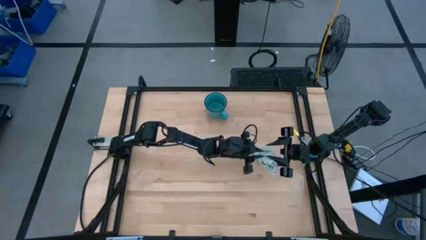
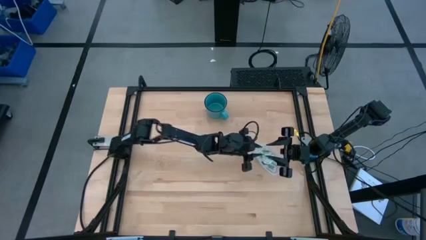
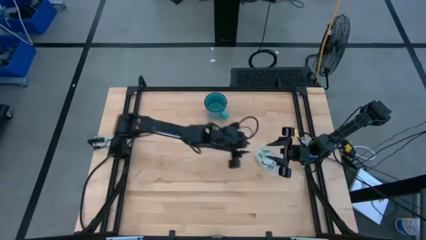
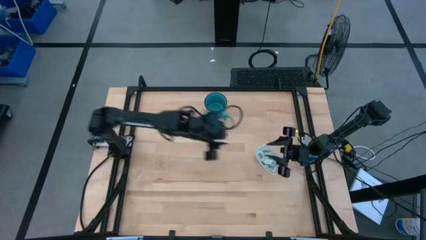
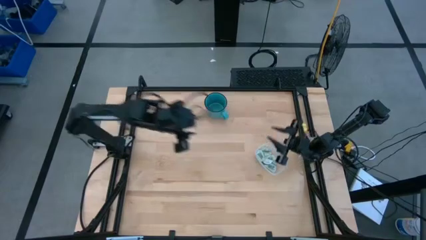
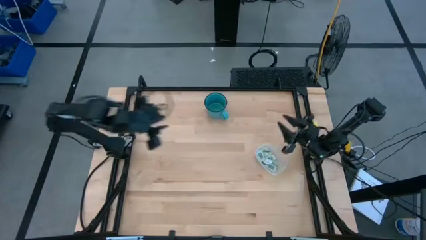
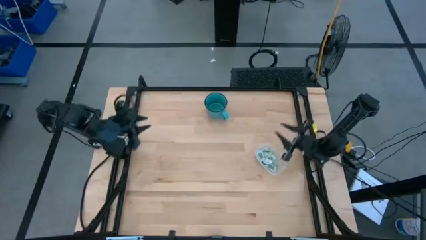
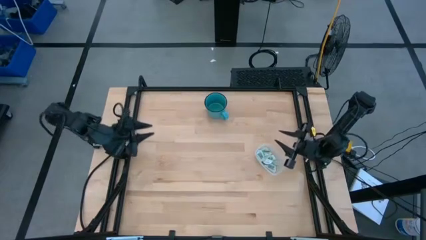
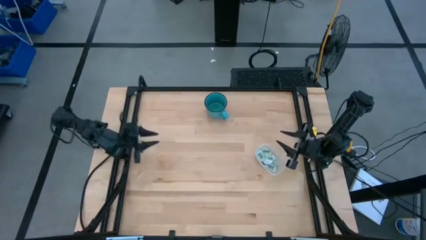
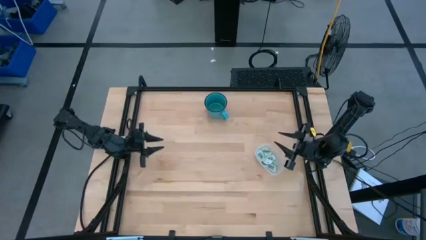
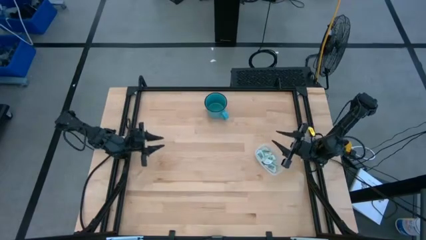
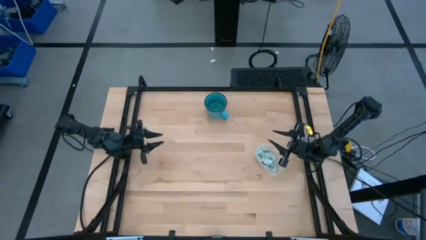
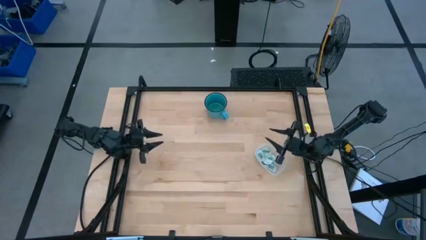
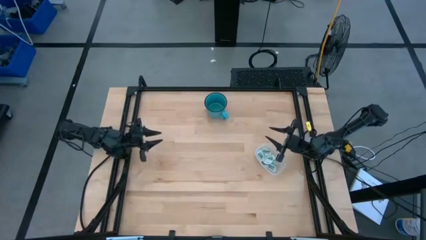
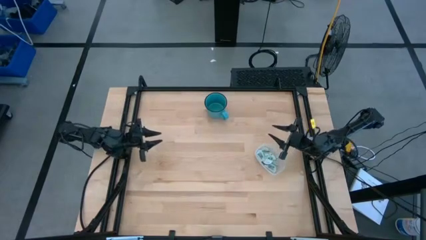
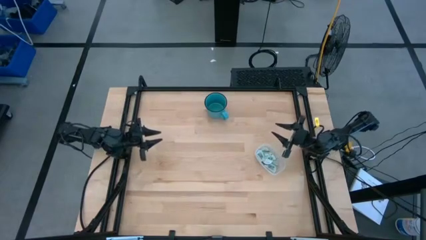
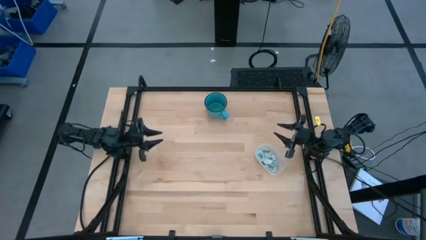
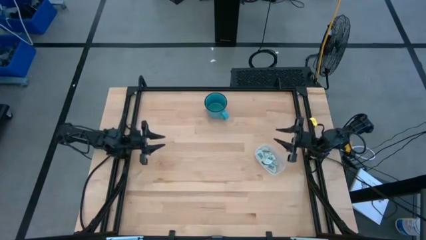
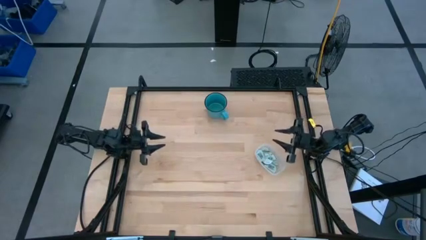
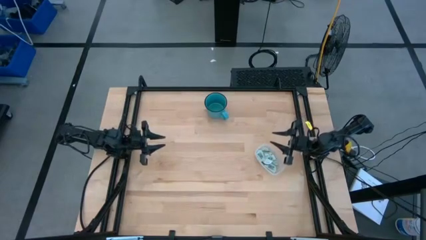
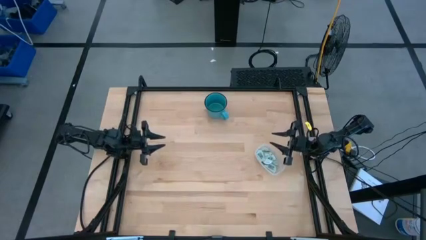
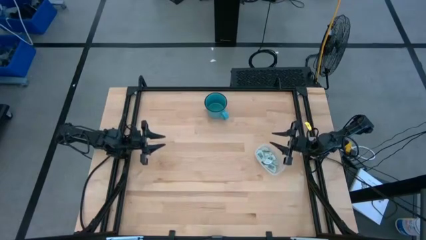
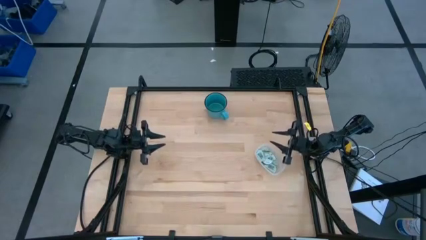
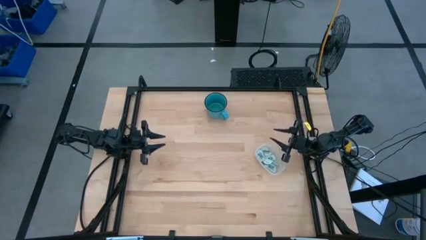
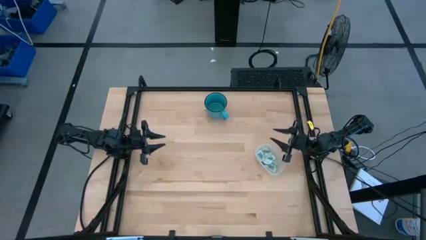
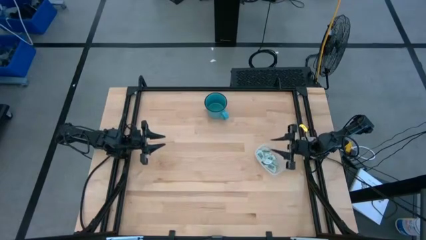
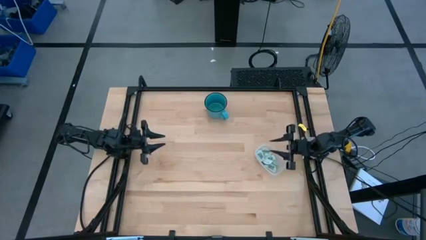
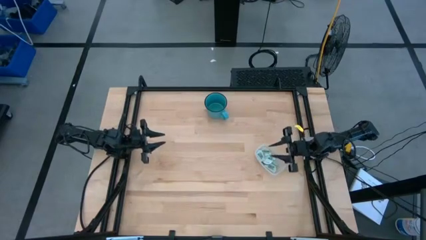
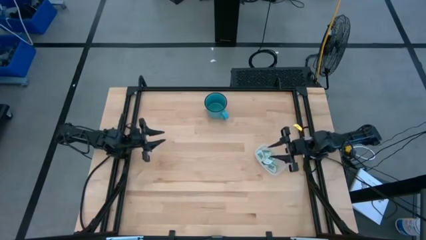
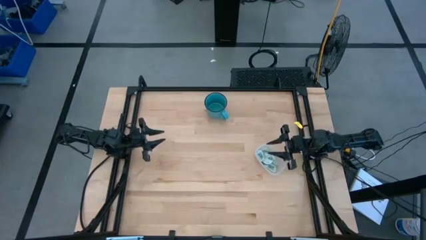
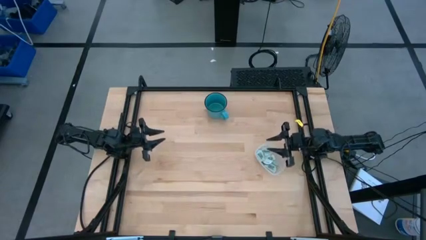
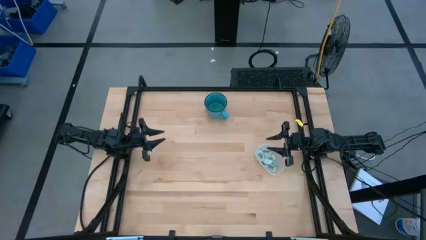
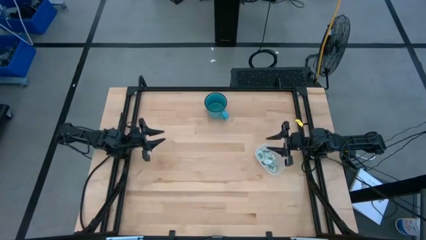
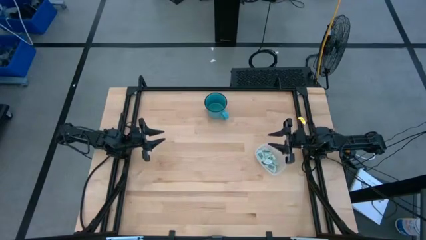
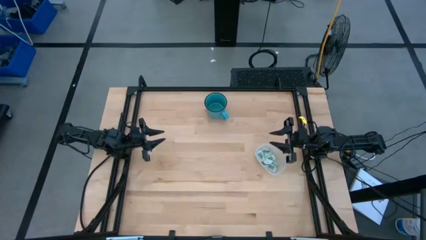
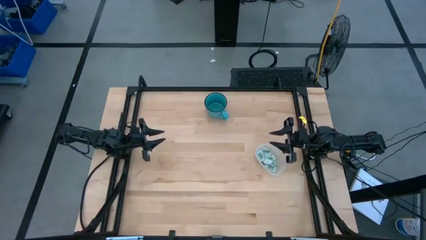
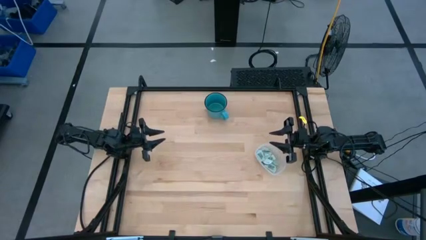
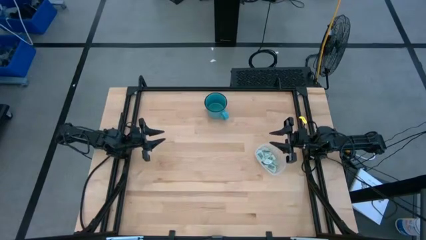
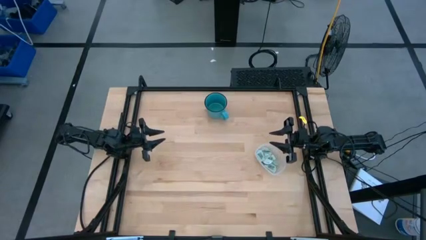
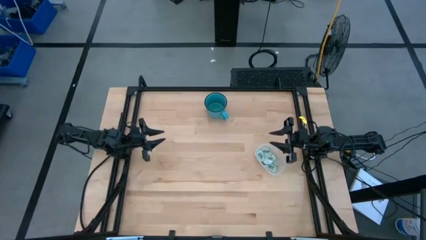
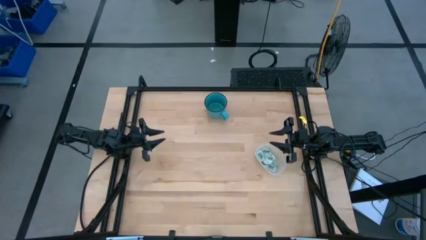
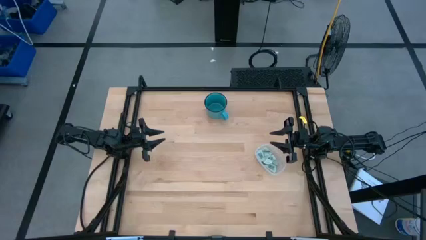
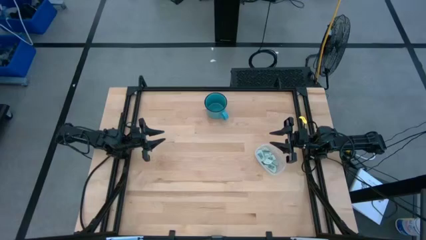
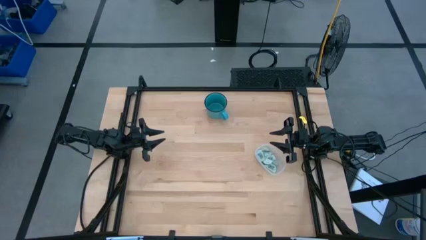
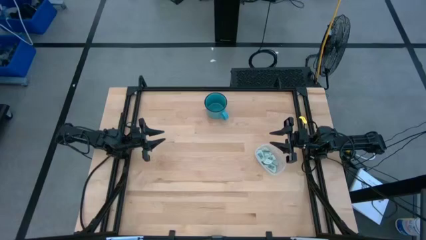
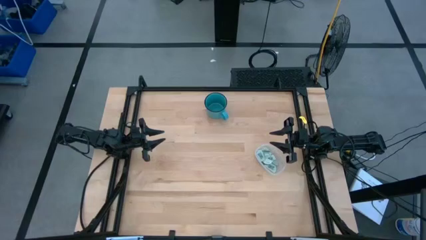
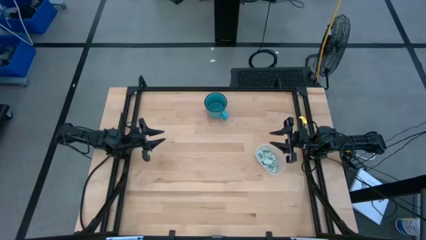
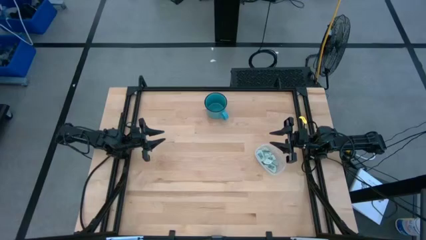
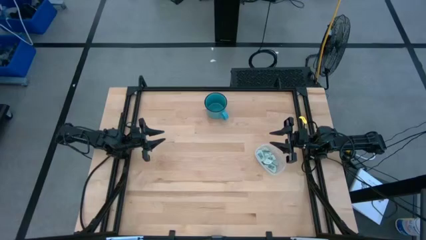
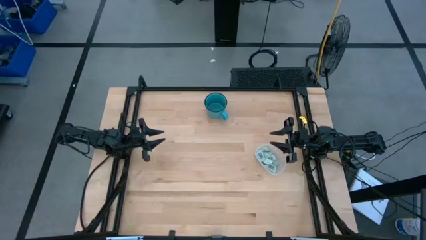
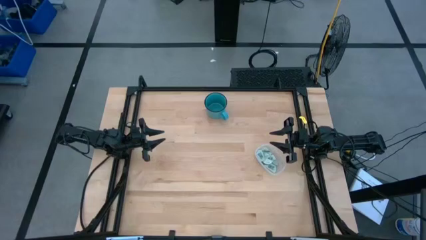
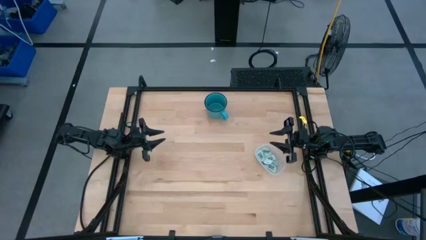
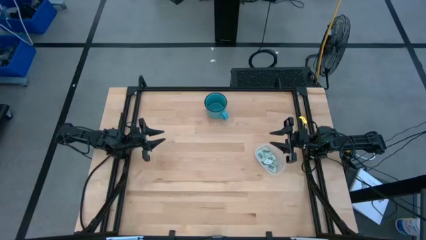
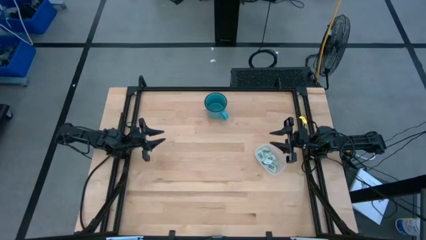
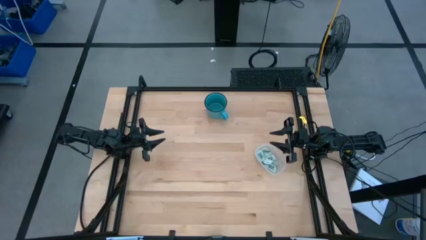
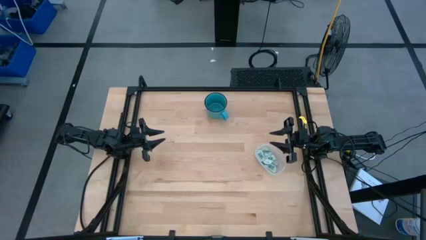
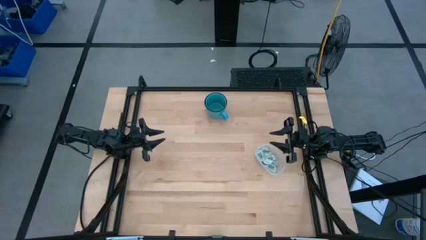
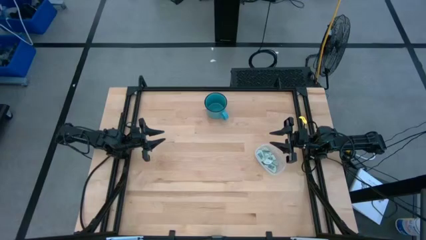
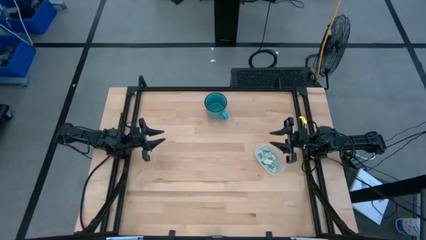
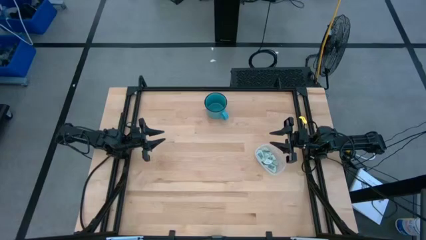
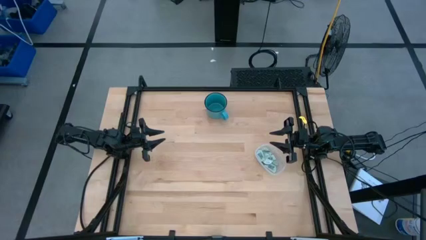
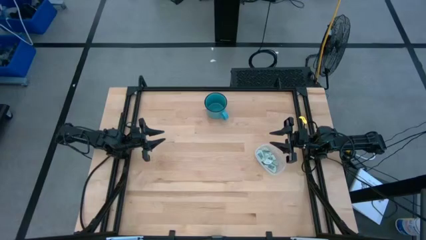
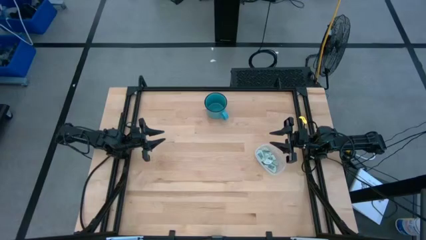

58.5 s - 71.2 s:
Task: Pick and place Stevia / Truvia into bins
Return to Home Position

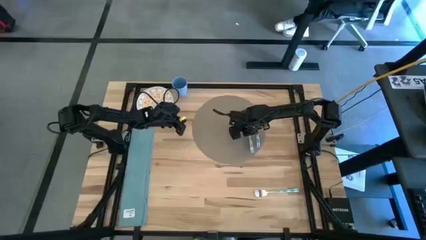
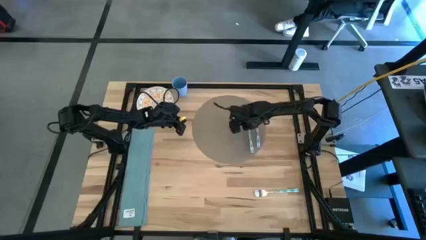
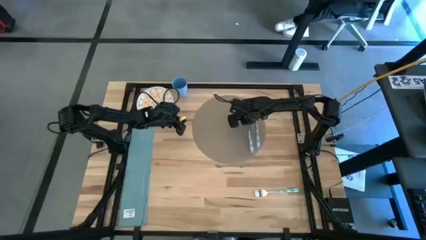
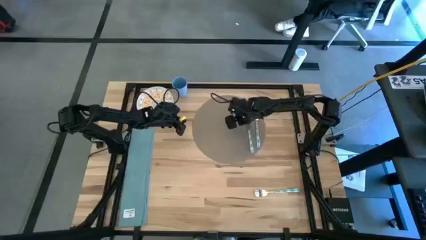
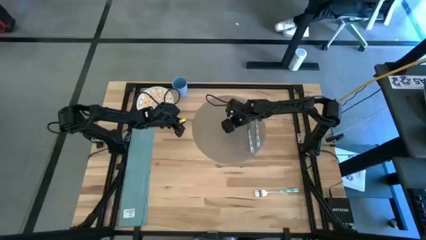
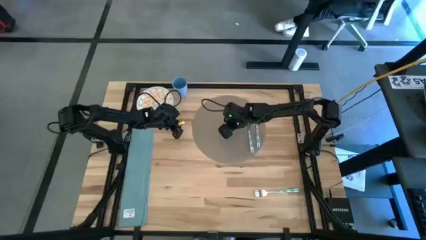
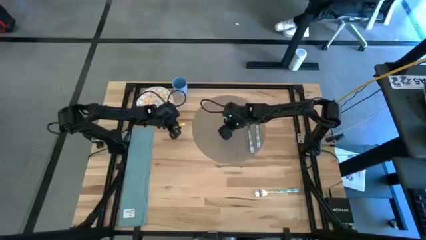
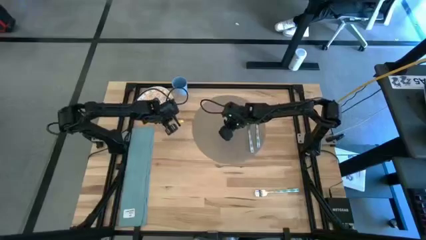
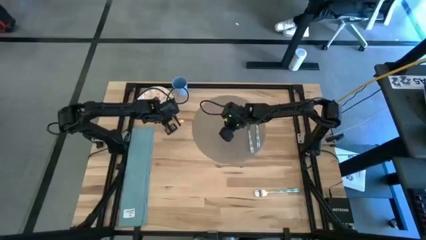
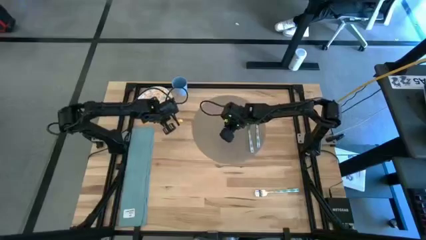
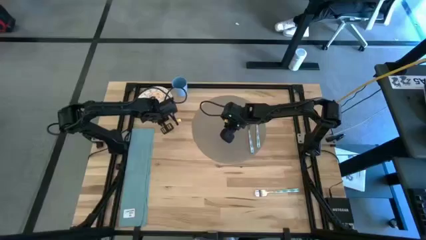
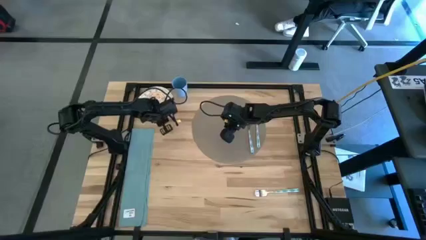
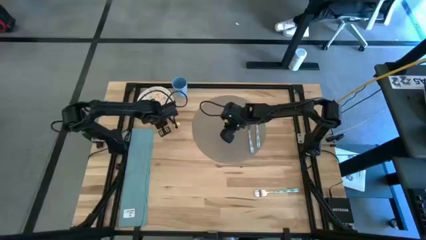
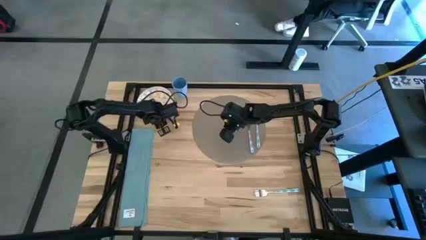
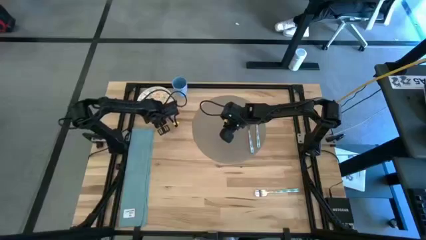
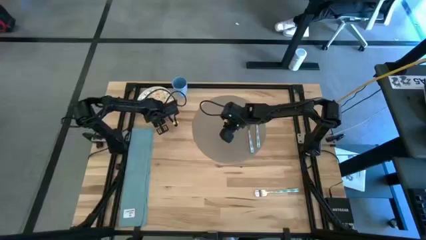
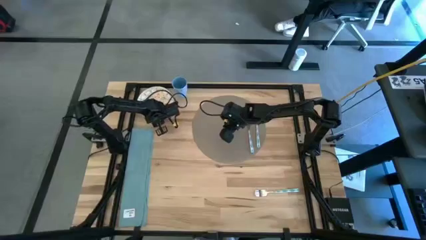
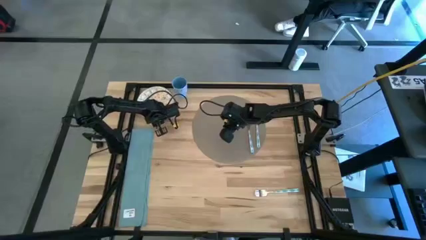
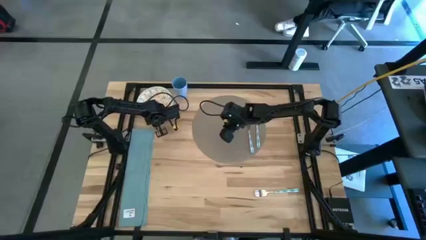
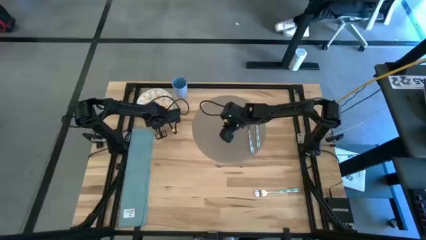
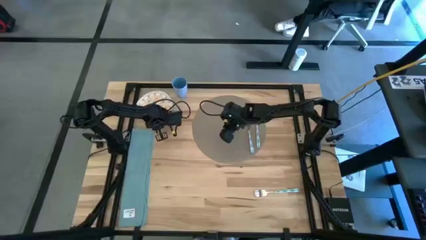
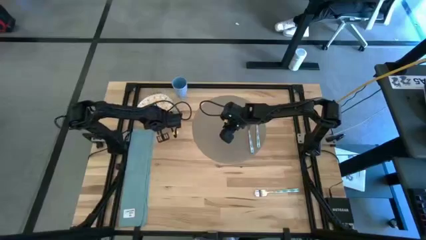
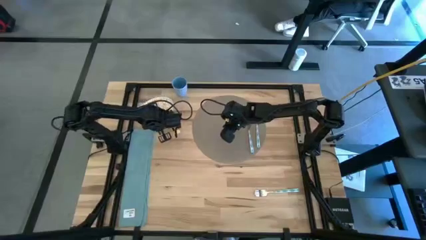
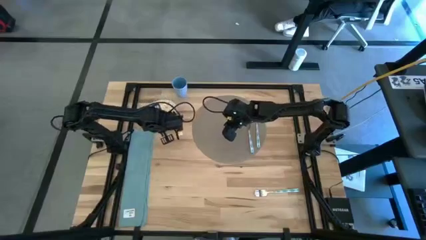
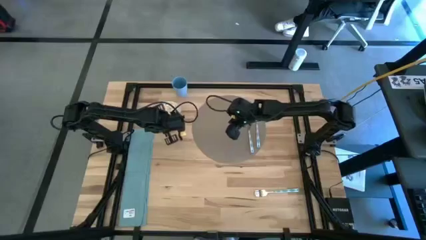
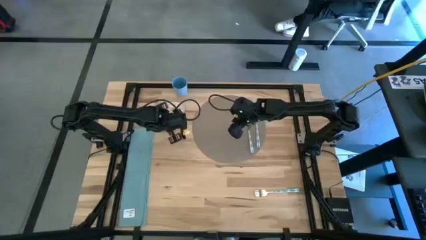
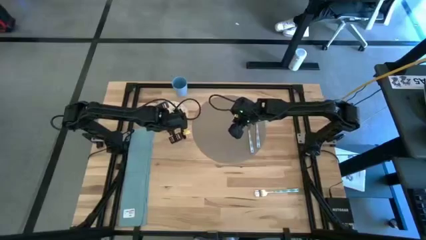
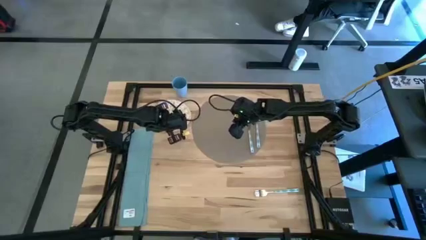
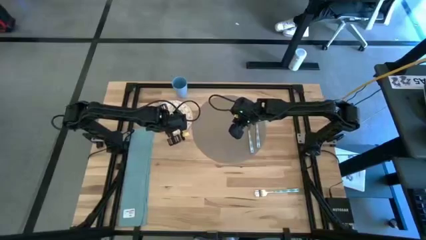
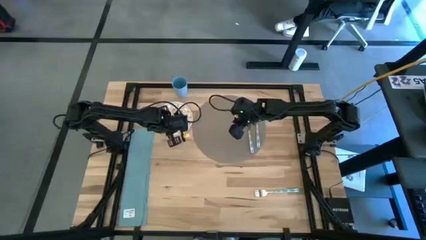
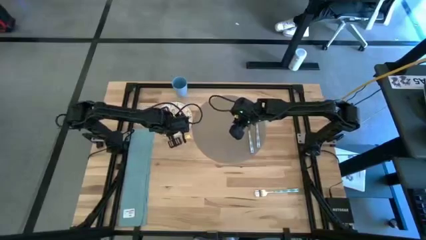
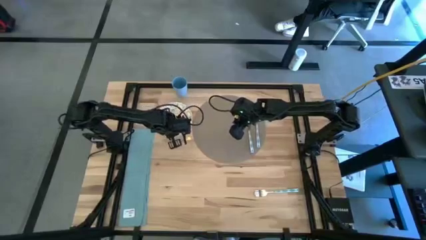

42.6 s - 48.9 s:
Task: Set table place
Put the blue plate on the brown mat
